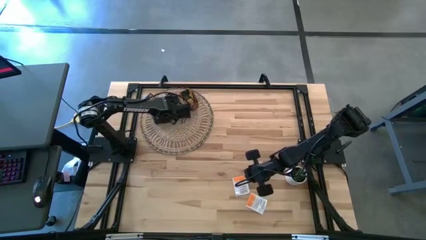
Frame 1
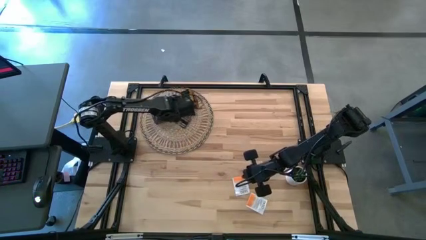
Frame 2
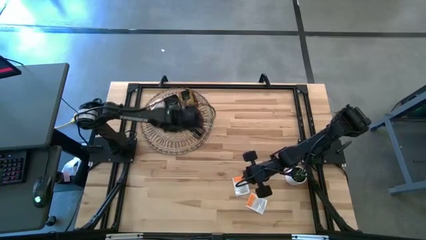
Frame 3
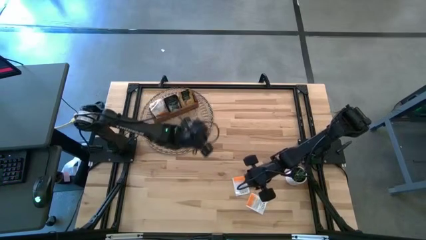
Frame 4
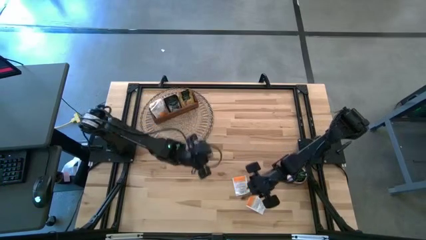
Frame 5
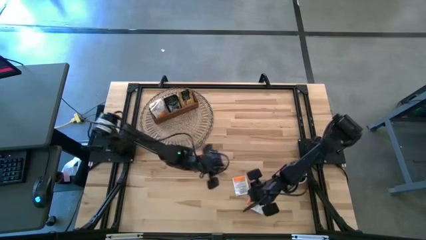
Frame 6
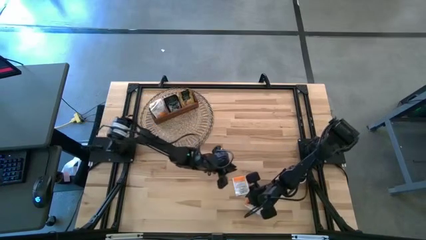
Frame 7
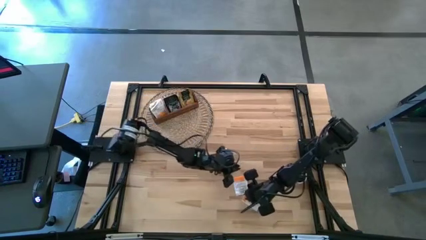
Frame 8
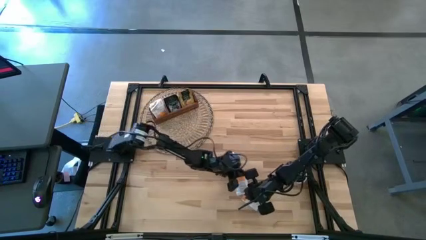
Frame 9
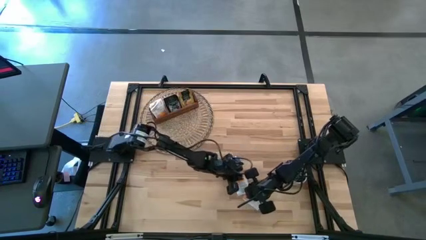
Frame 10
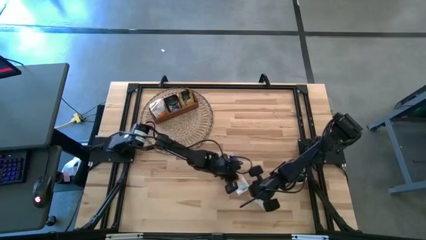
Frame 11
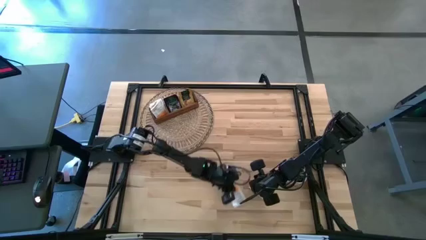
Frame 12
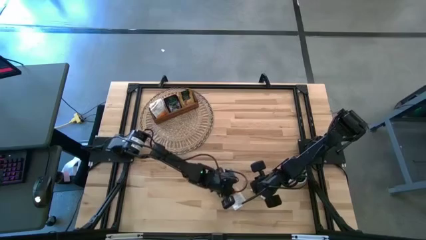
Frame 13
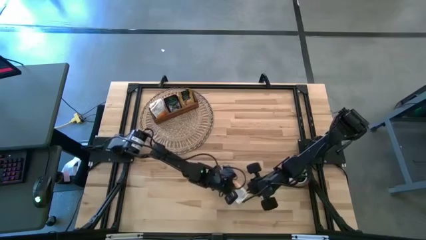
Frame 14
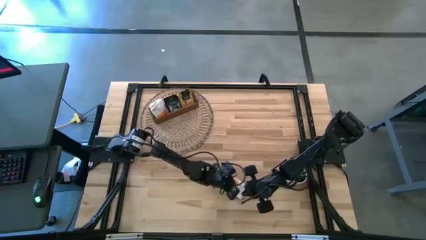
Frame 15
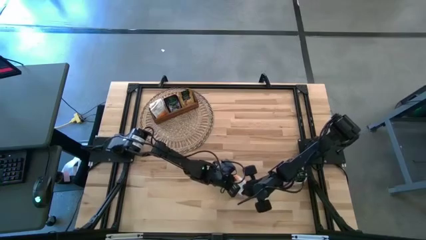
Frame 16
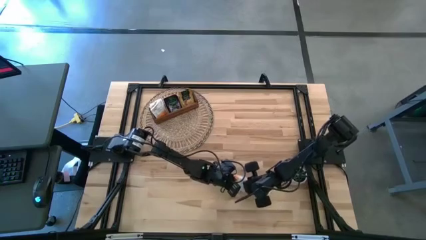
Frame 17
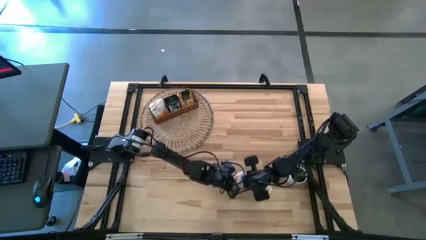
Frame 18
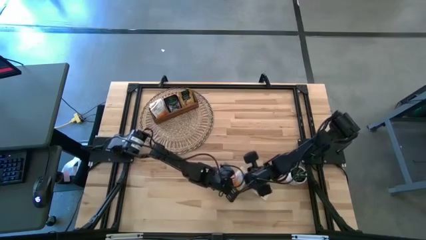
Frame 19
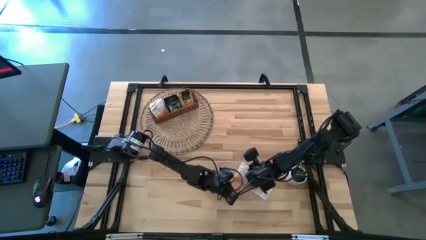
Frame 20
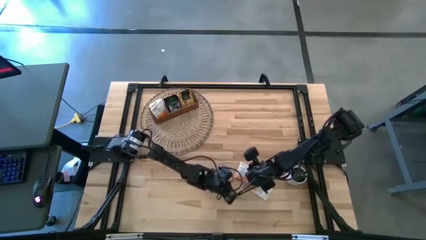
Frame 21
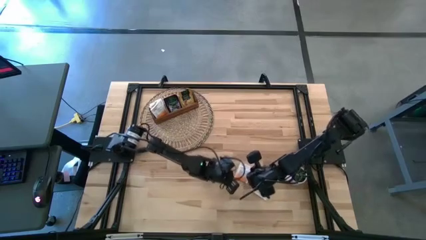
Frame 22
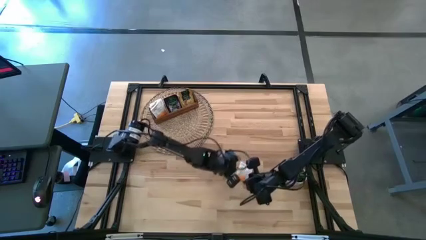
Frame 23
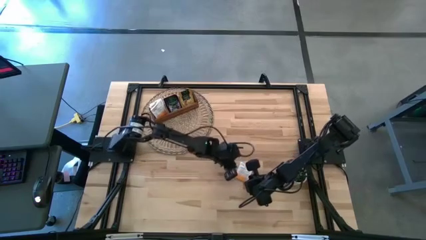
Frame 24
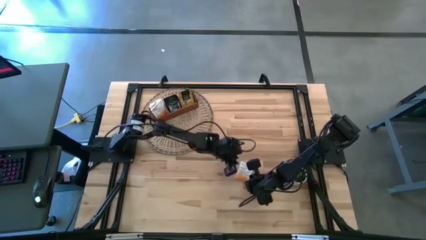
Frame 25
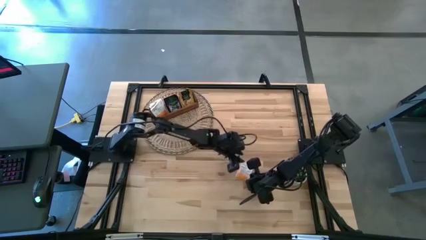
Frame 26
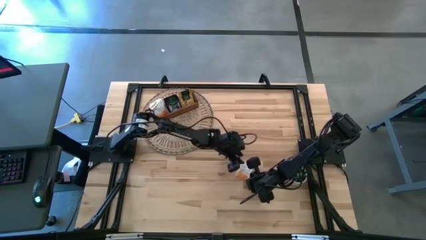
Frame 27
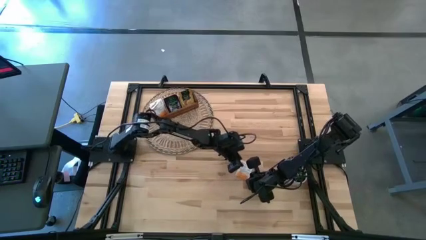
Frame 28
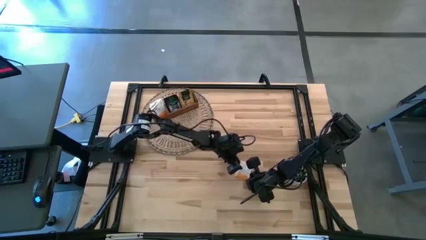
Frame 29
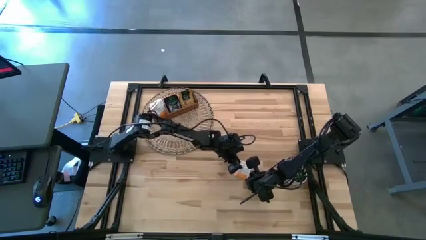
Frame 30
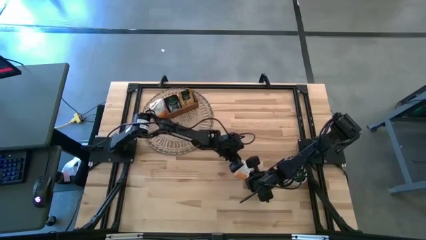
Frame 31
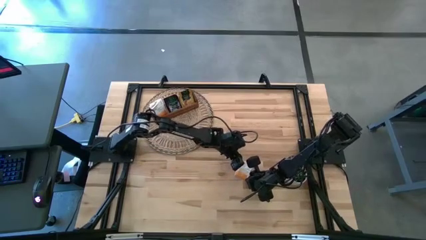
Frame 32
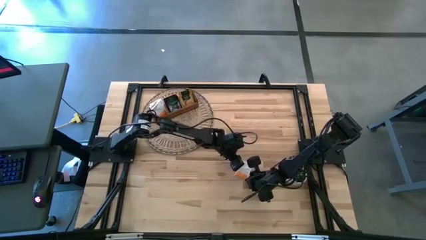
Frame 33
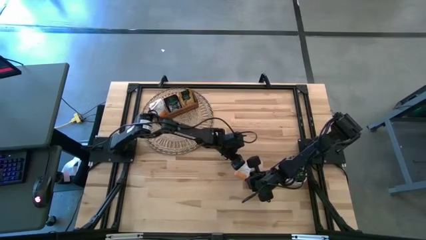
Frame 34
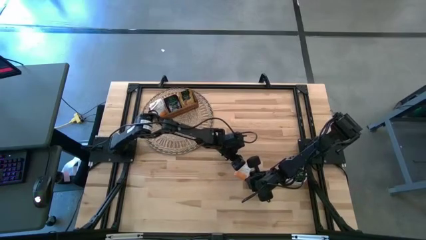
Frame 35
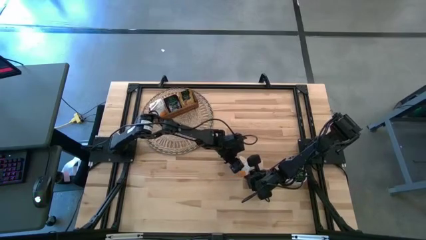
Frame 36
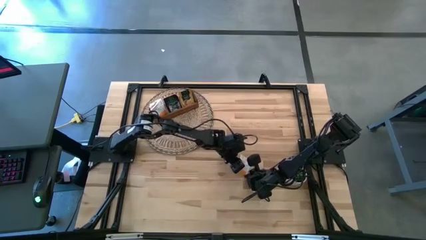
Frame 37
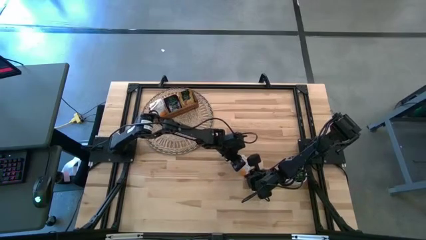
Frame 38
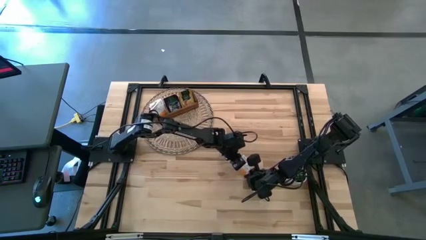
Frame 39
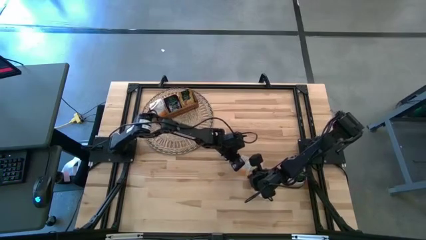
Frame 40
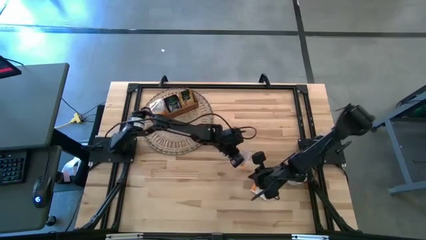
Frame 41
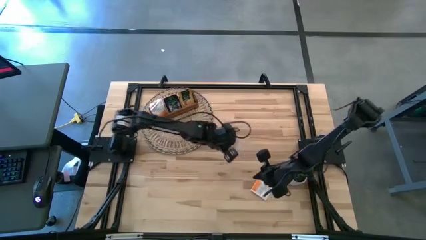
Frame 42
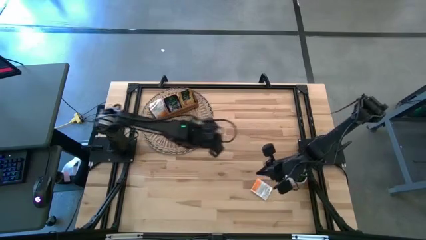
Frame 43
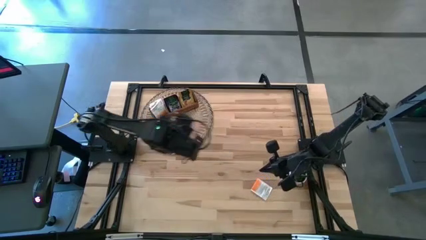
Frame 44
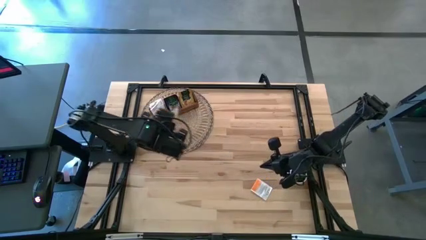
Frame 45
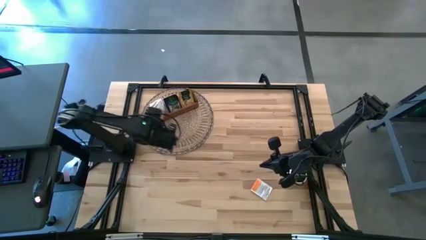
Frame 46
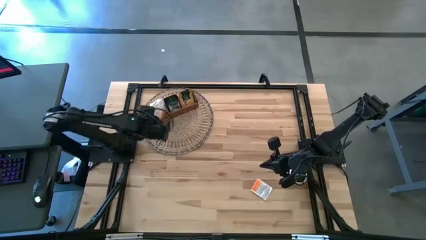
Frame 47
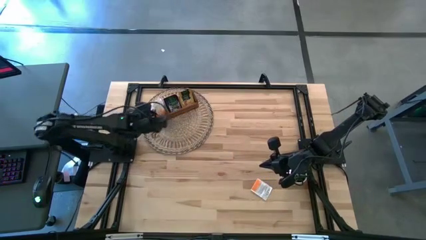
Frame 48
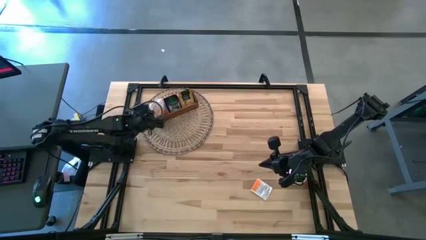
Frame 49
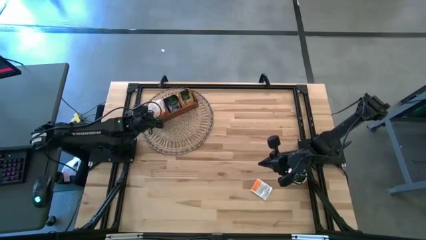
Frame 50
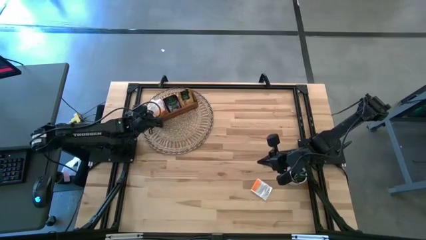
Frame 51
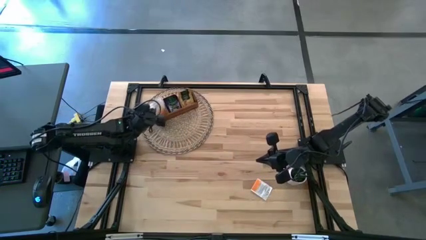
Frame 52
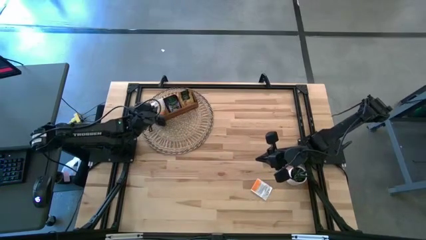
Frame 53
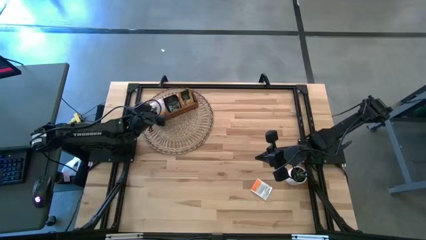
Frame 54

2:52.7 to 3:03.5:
Task: Pick & Place Tea
Put the orange tea bag into the left section of the wooden organizer

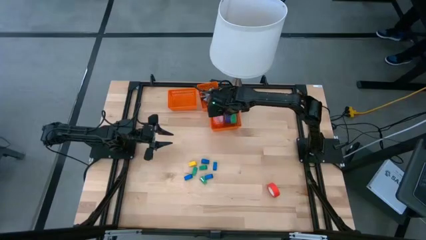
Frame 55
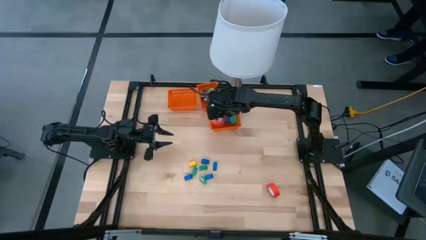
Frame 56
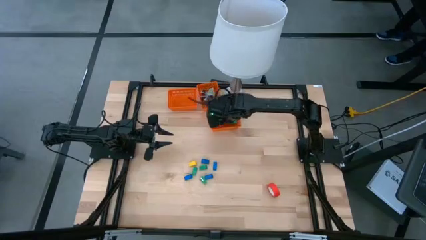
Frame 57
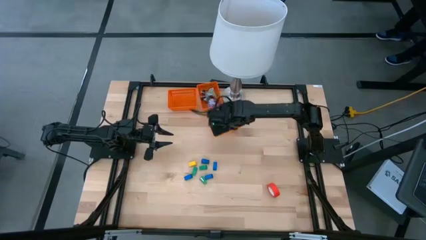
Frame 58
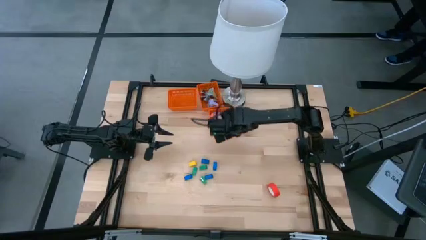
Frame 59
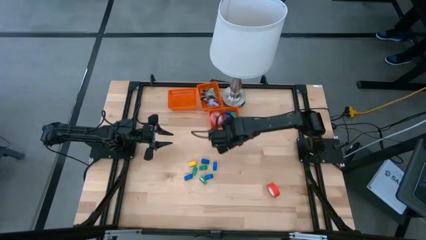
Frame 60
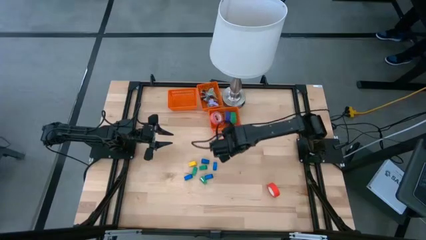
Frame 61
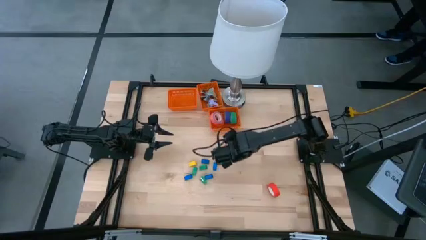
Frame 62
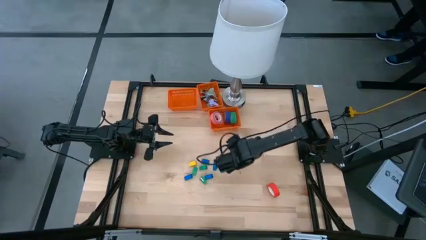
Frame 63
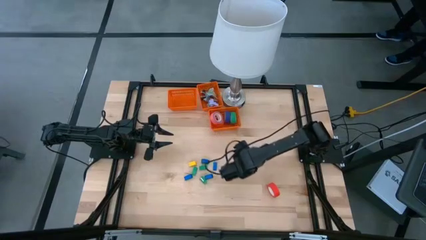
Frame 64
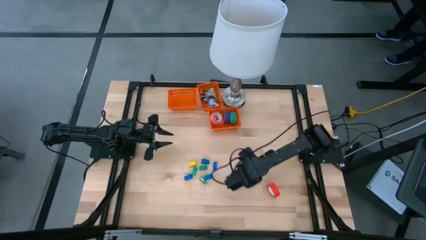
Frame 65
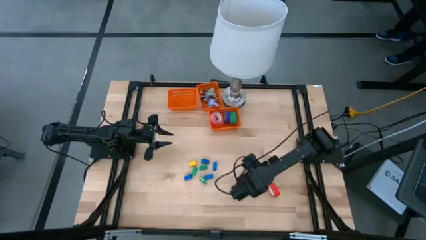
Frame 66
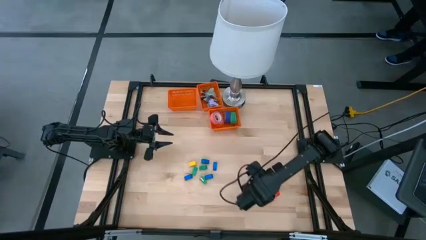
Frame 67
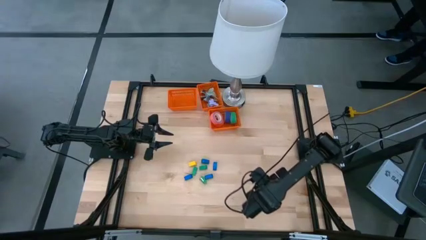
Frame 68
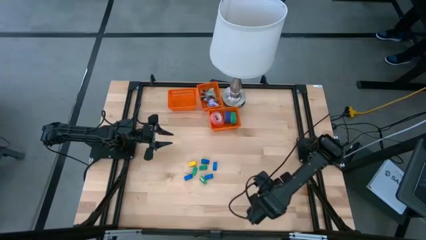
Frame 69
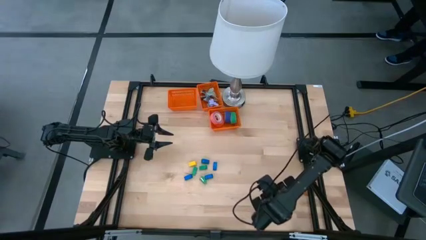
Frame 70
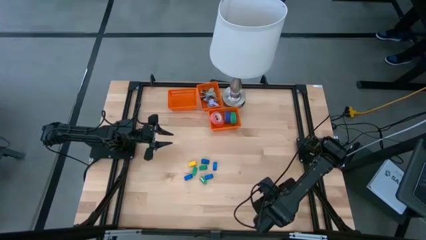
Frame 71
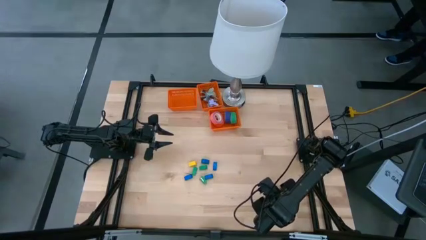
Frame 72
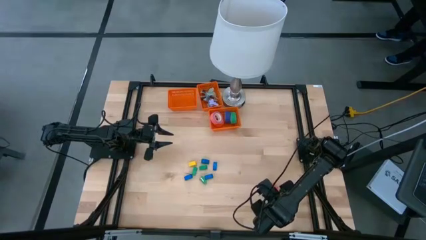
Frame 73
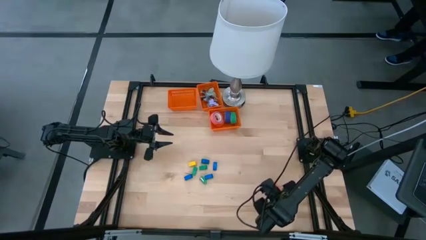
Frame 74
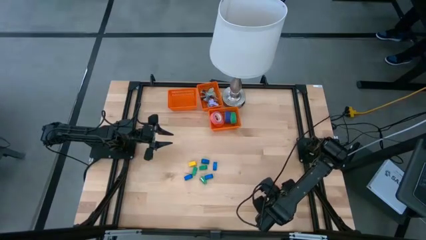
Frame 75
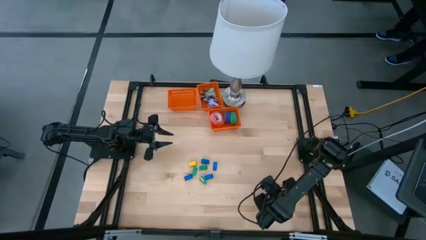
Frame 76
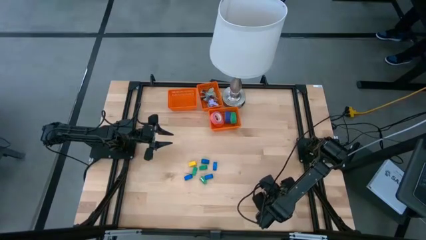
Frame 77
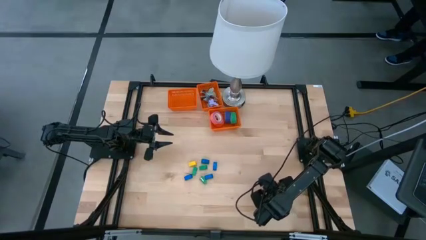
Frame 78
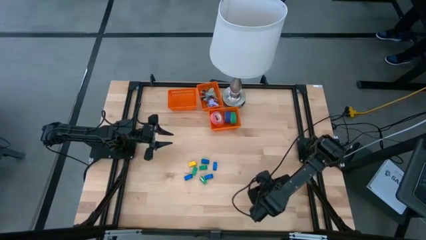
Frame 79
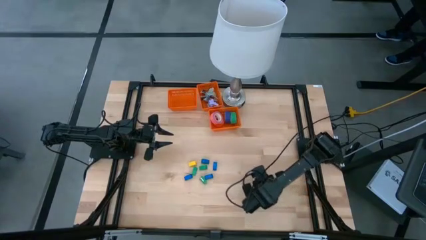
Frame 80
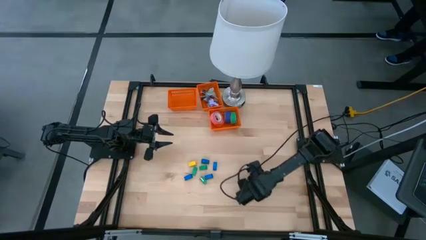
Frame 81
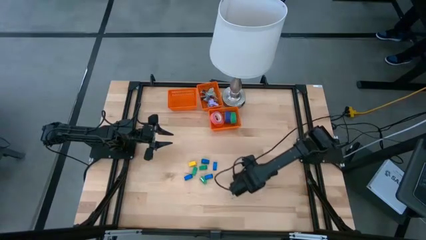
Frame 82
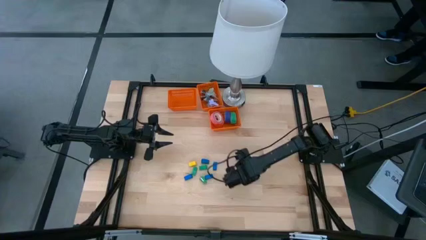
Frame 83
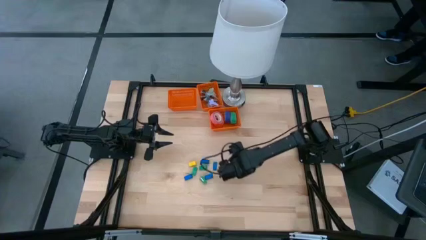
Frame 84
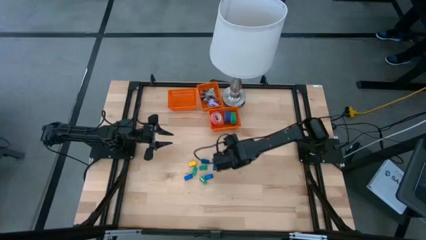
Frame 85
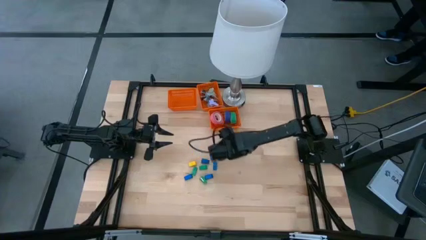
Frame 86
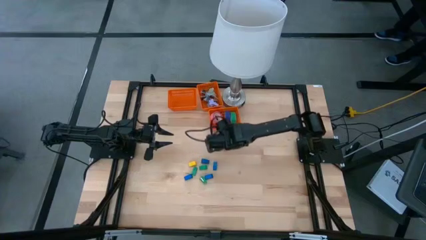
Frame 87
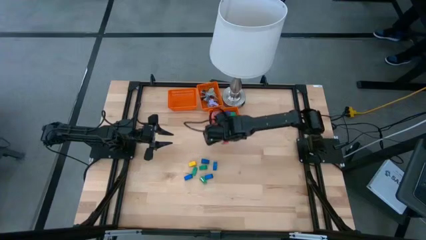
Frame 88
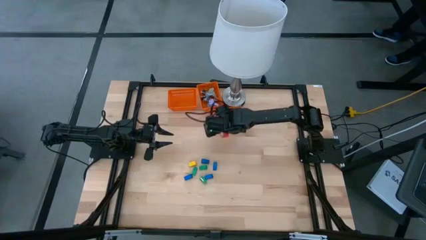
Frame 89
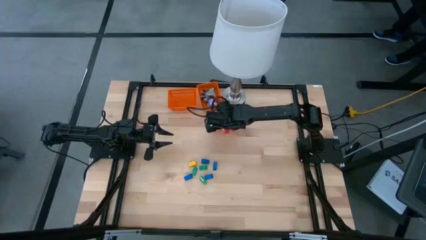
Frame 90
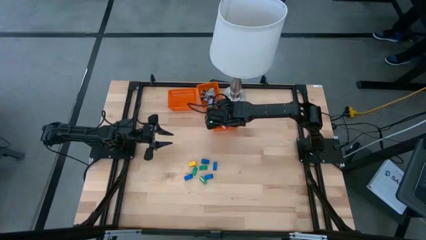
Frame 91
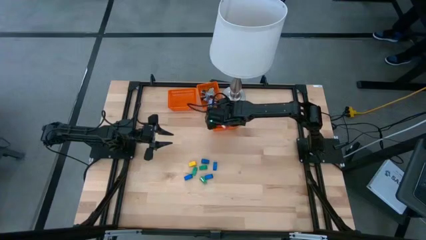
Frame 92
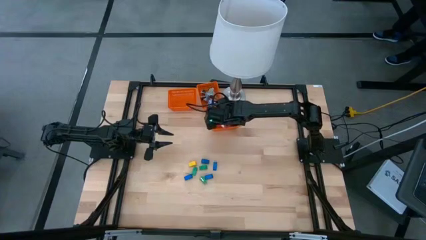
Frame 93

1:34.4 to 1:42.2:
Task: Pick and place Stapler, Stapler remover, tape
Put the red tape into the bottom right orange basket
